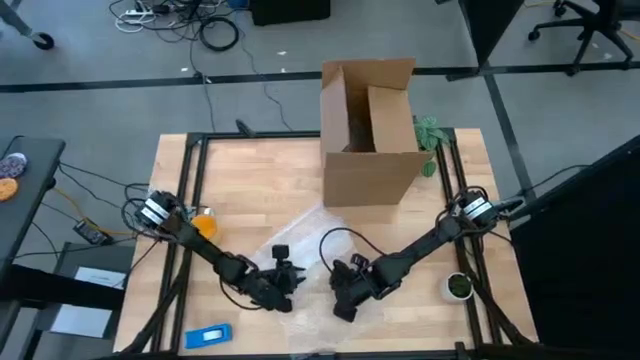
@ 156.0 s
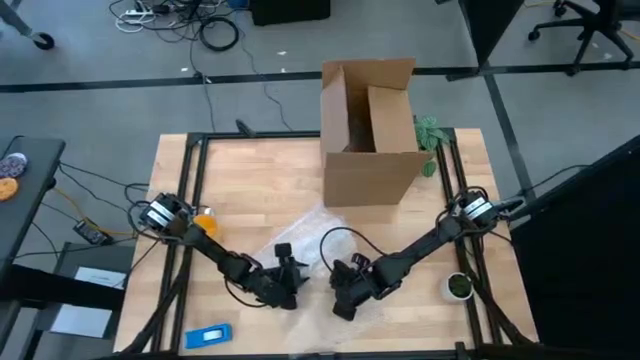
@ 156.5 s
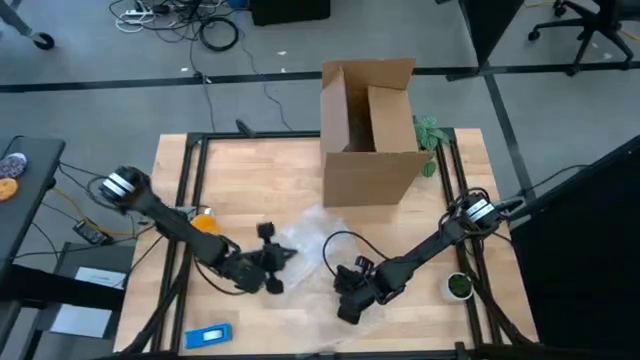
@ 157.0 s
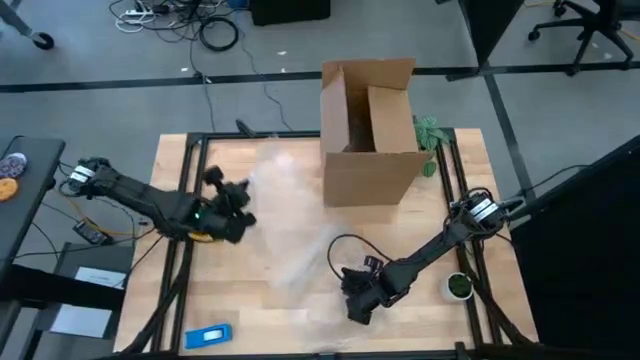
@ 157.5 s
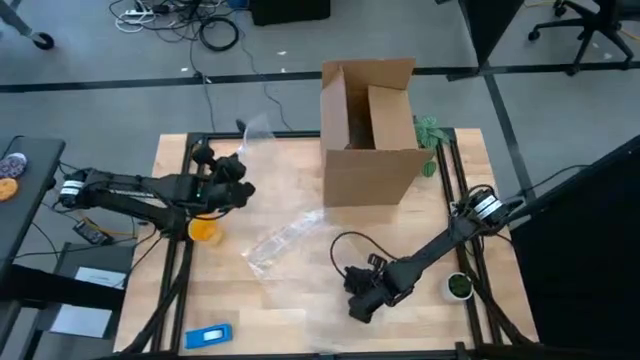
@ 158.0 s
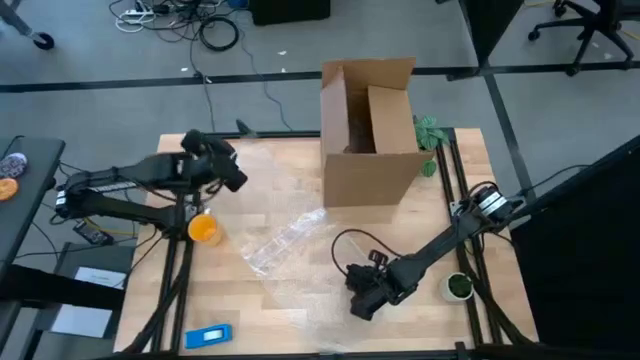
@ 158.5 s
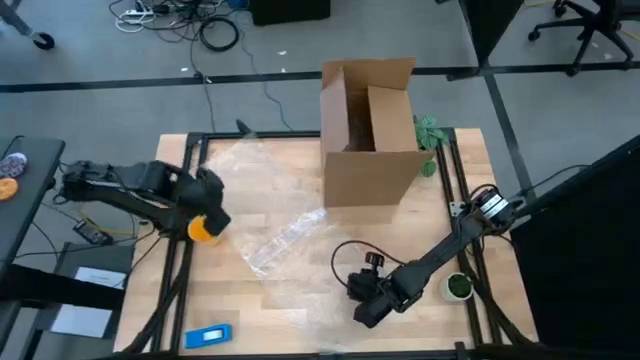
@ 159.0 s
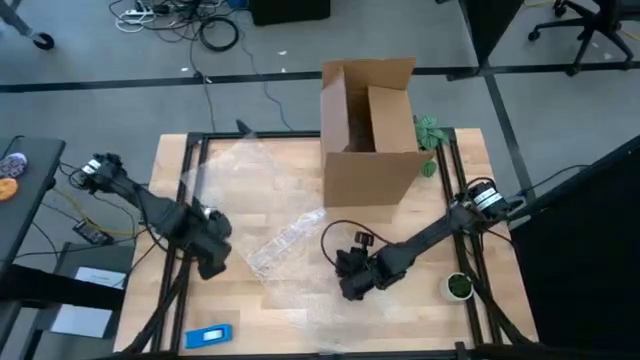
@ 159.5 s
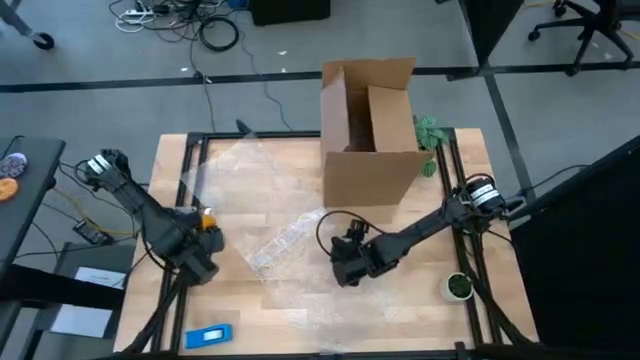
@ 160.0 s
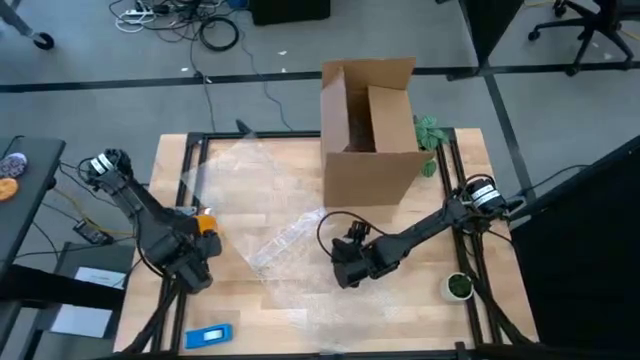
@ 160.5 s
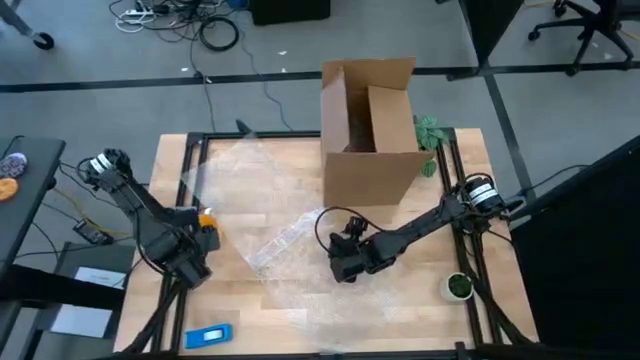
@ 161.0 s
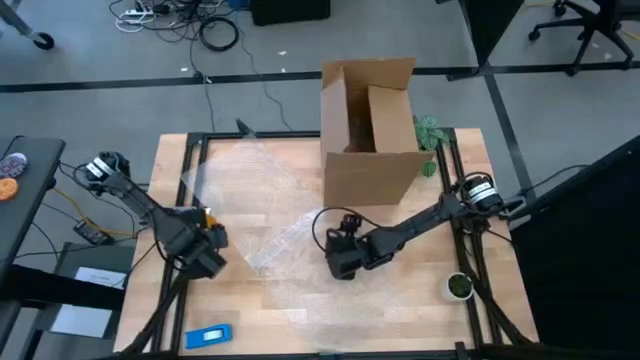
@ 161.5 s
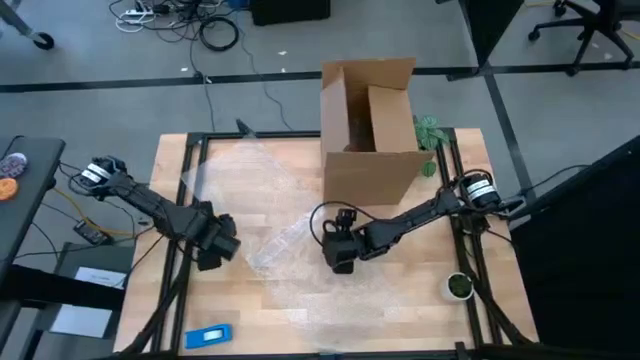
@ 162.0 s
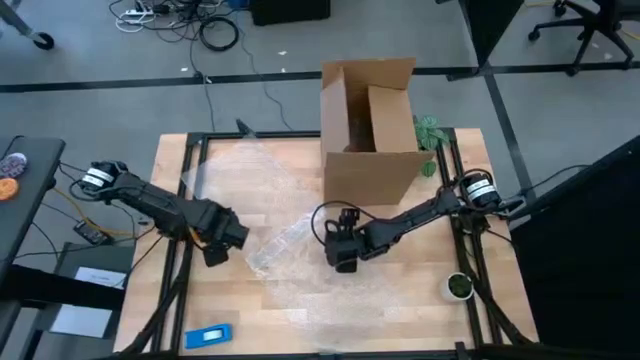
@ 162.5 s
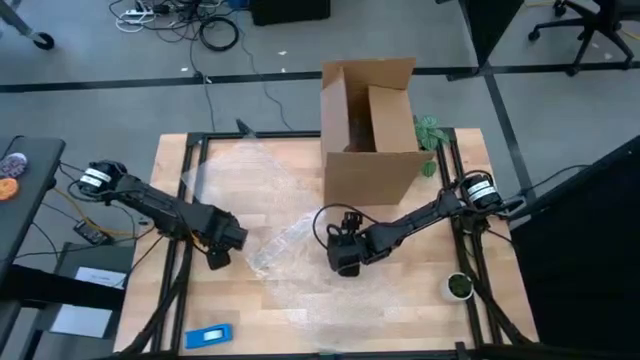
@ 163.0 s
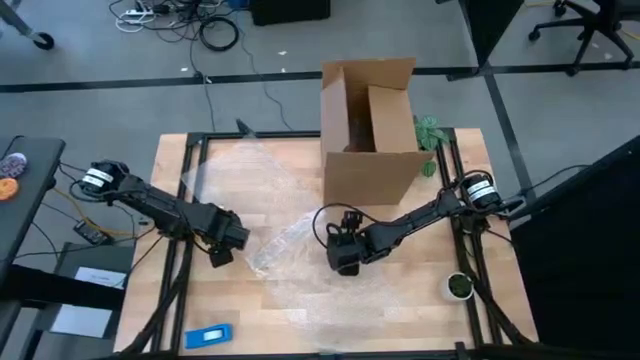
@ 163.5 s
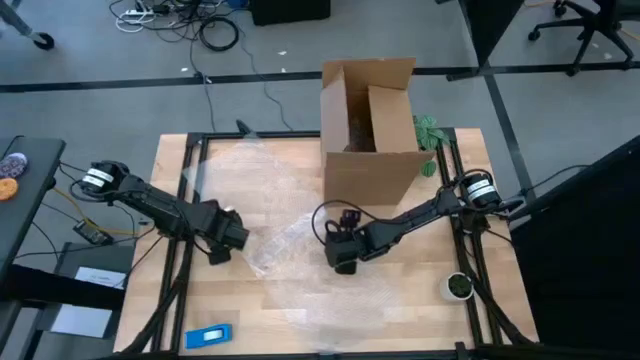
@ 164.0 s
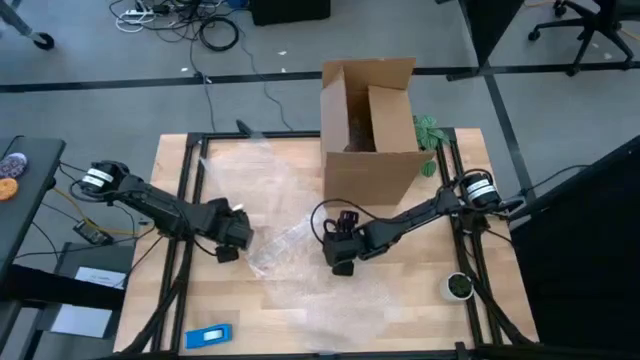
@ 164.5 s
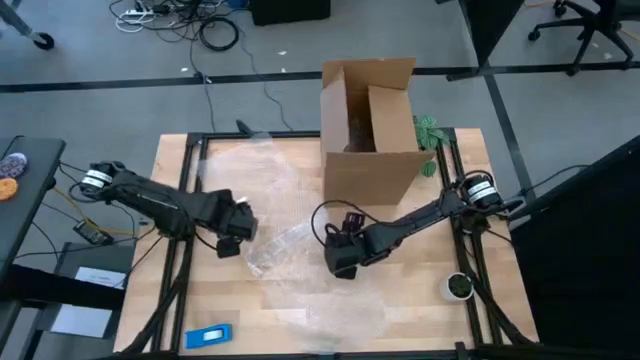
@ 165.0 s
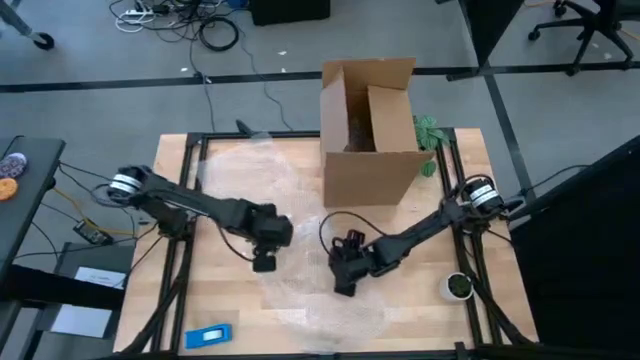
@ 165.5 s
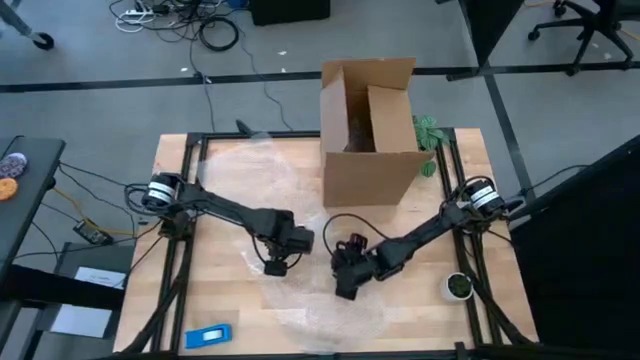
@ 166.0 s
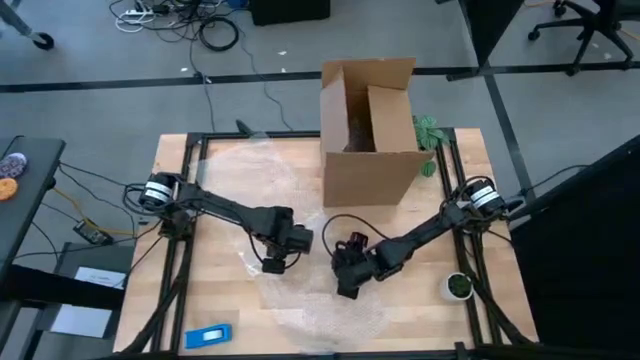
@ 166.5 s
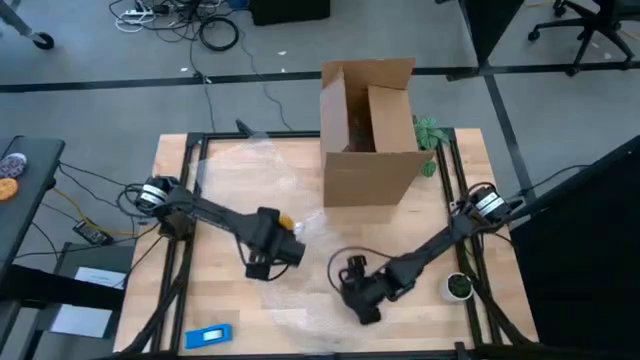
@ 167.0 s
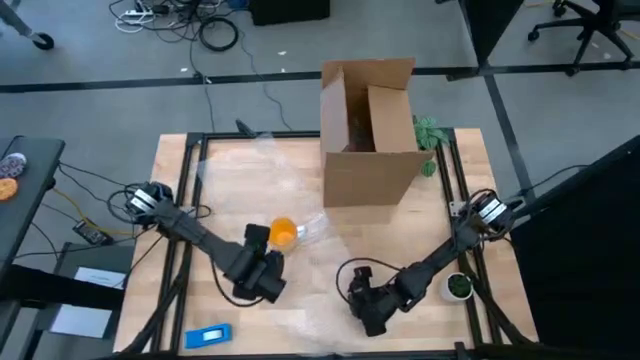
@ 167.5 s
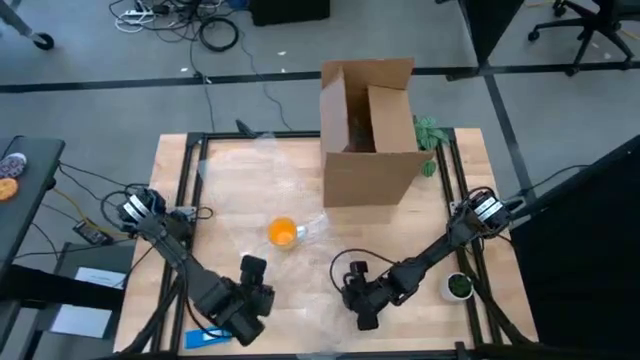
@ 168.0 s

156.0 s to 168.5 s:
Task: wrap mug
Wrap the yellow mug with transparent bubble wrap

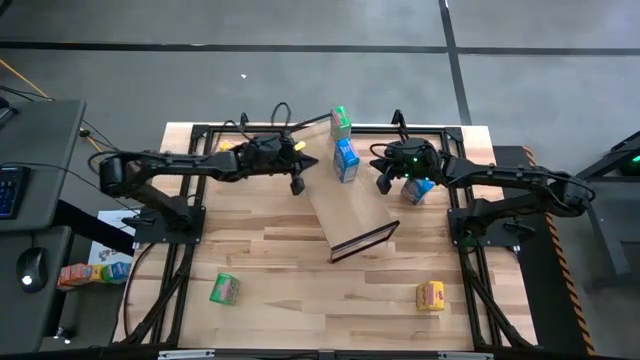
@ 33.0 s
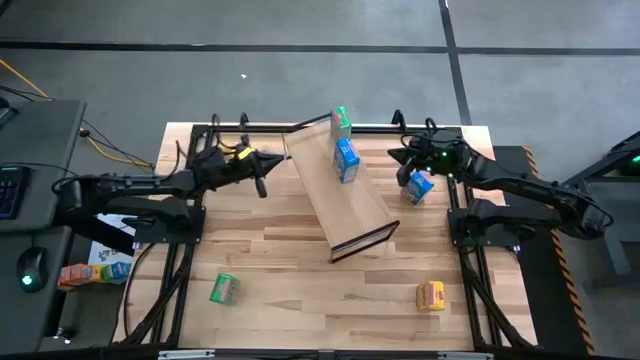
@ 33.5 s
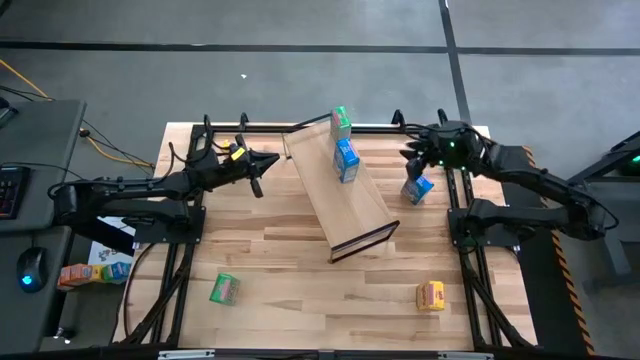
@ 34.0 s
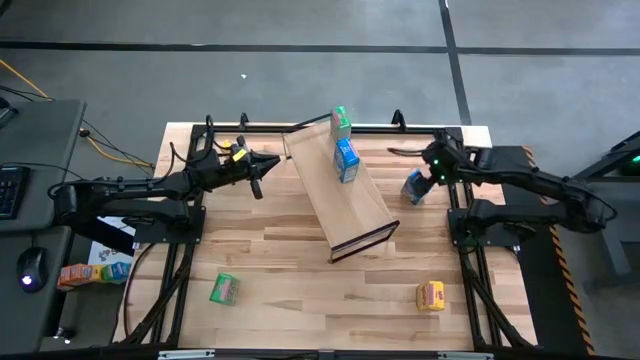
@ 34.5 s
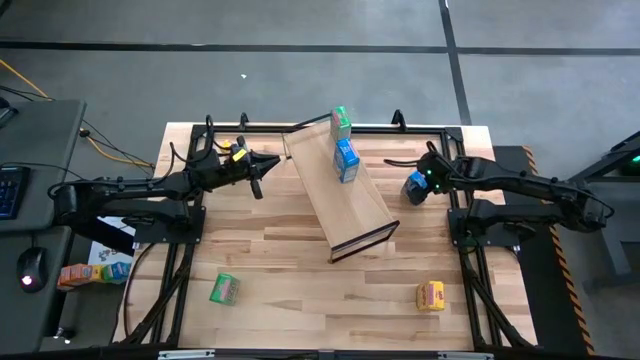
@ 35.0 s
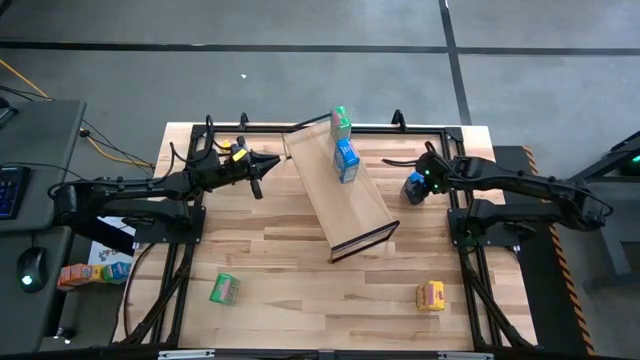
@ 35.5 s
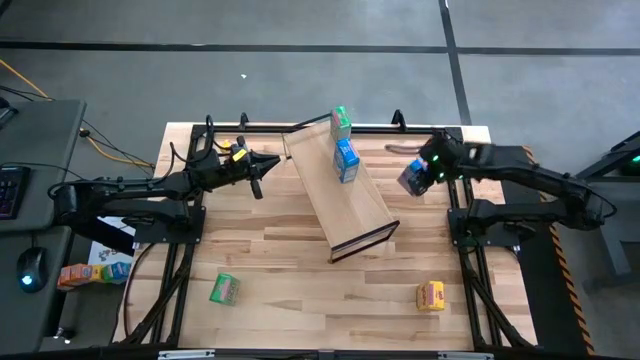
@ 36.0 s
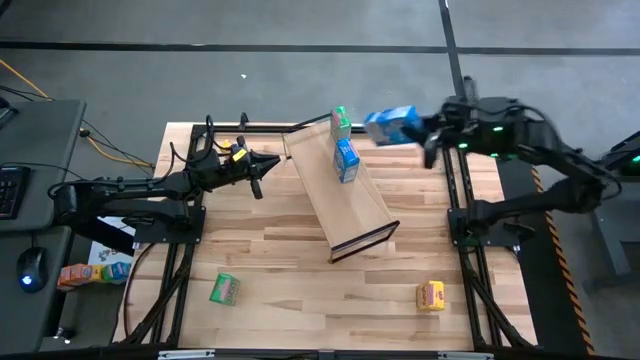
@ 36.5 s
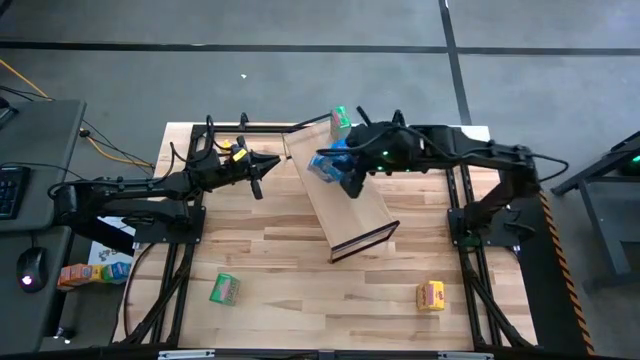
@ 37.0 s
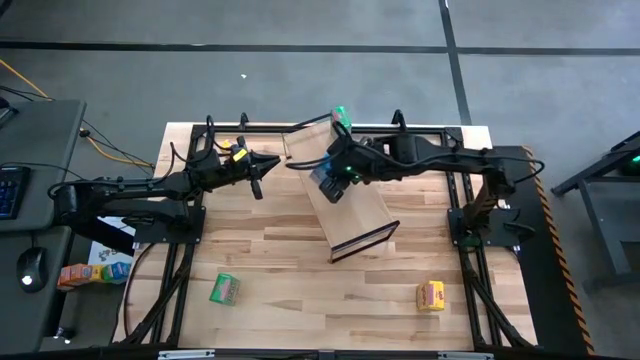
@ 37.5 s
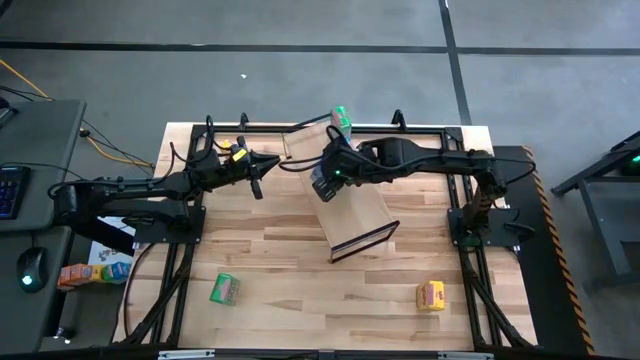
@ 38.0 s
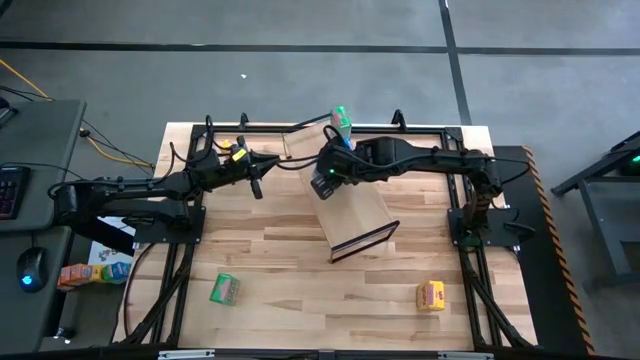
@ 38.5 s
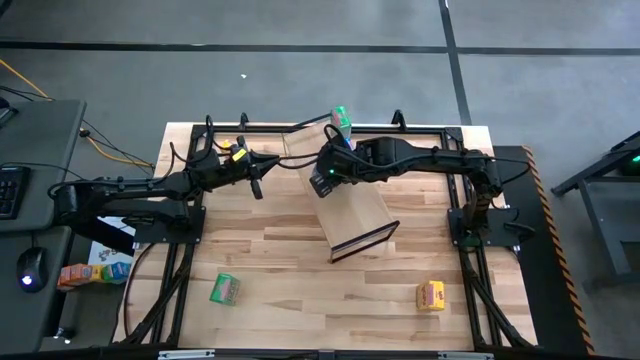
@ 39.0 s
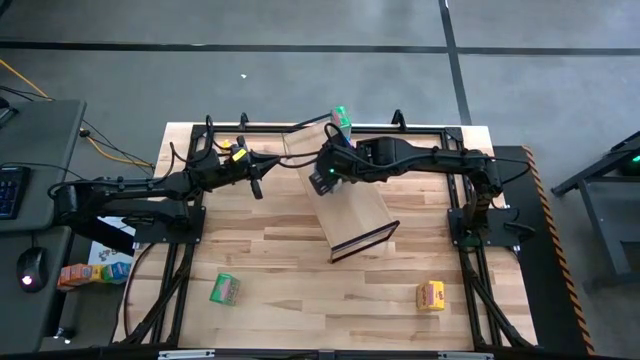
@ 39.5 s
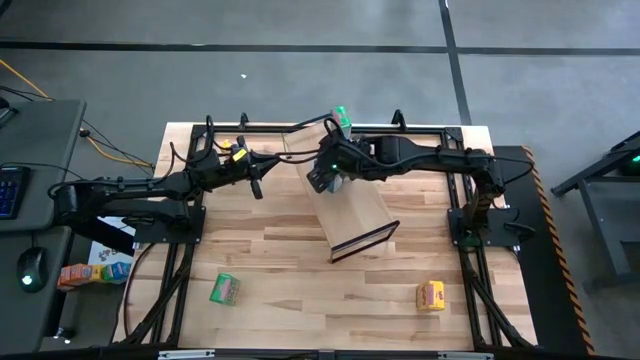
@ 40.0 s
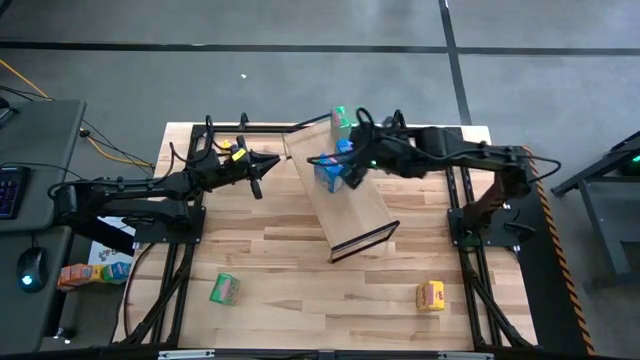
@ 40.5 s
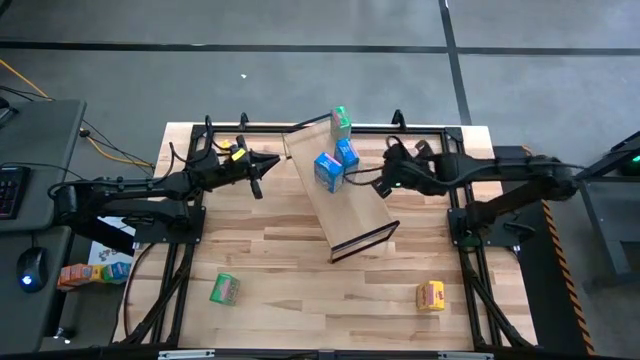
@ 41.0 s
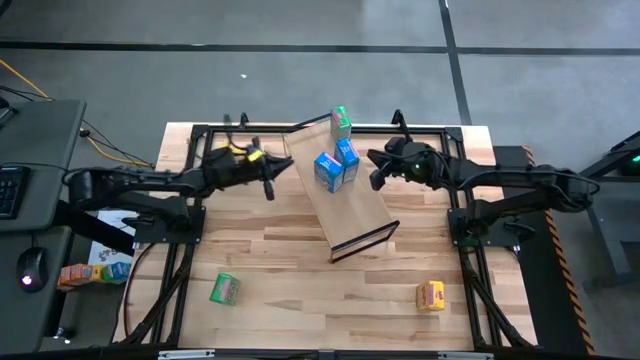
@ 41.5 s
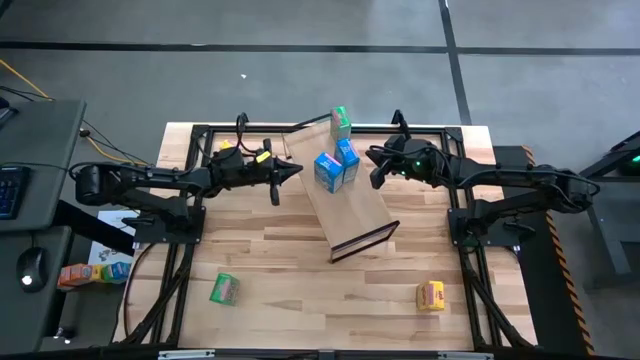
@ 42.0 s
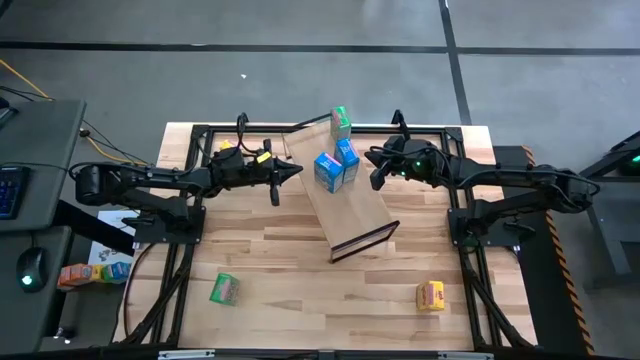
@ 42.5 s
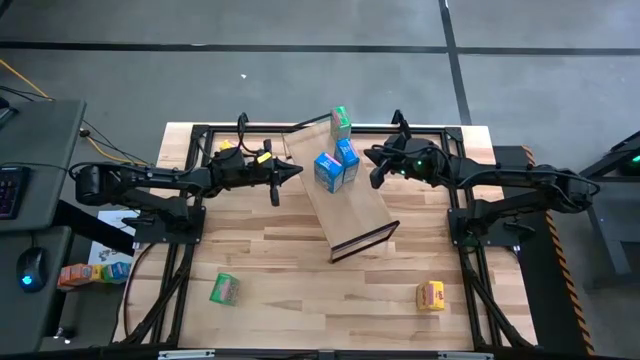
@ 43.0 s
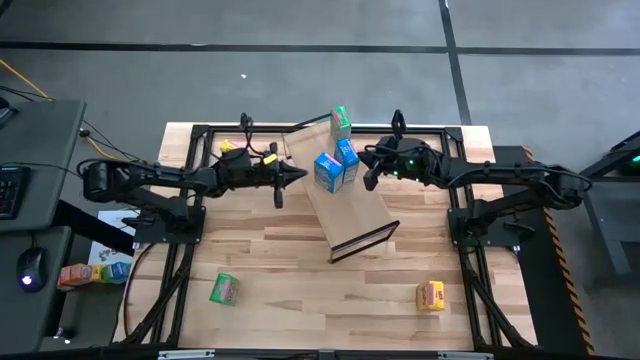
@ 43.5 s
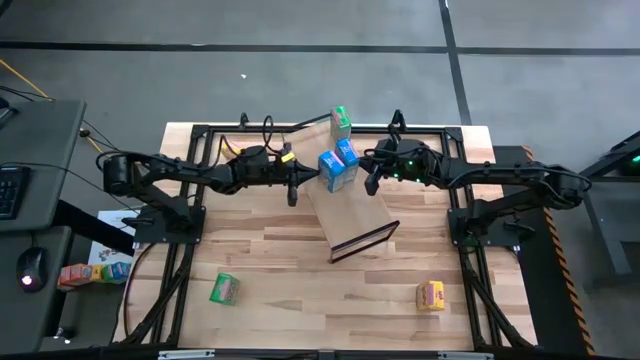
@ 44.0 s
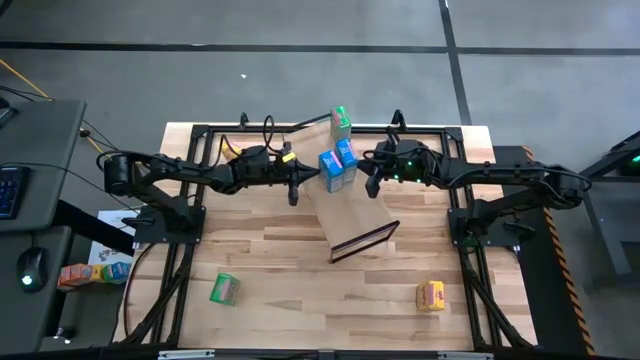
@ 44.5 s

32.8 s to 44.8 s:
Task: Stack cereal on shelf
Put the blue cereal box on the shelf aligned with the other blue cereal box
